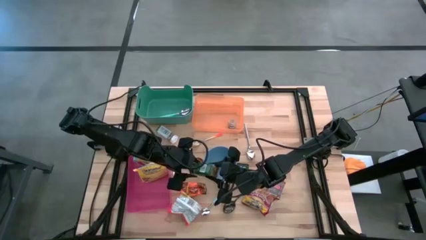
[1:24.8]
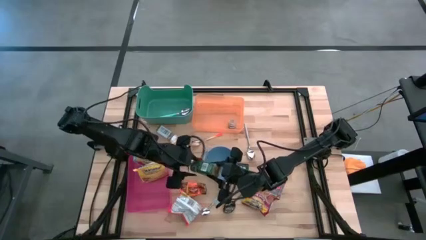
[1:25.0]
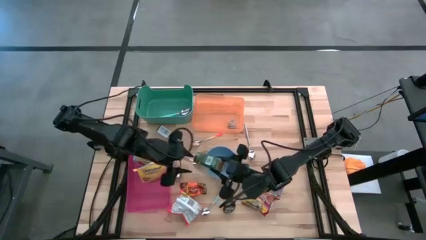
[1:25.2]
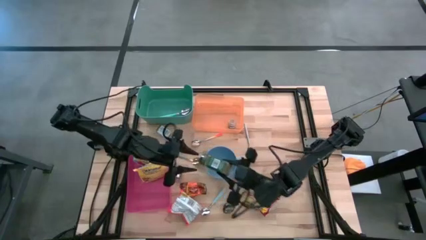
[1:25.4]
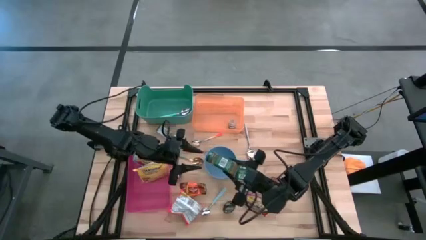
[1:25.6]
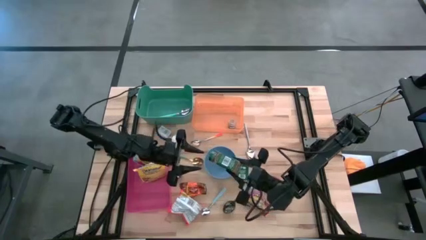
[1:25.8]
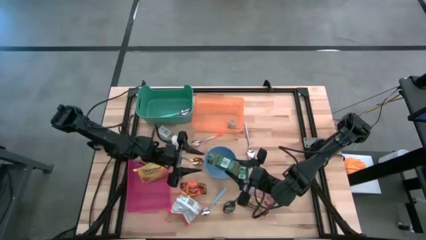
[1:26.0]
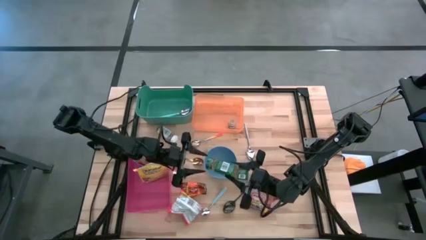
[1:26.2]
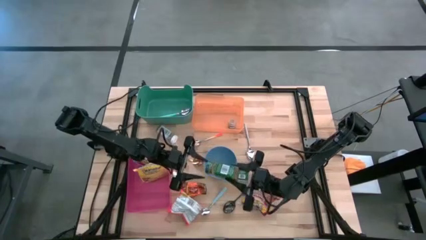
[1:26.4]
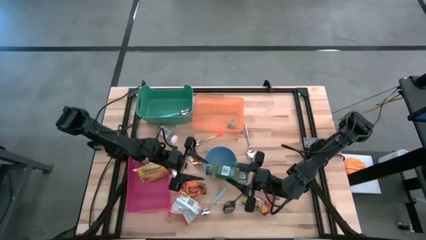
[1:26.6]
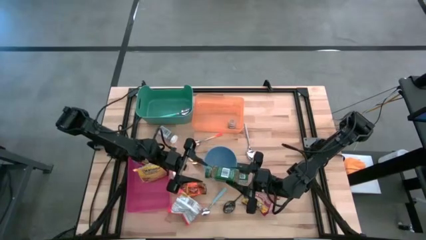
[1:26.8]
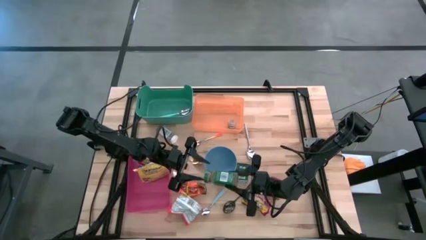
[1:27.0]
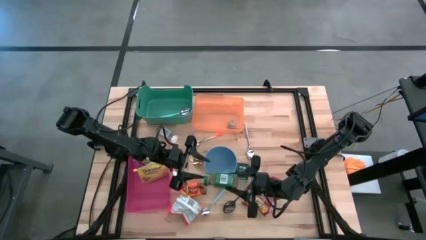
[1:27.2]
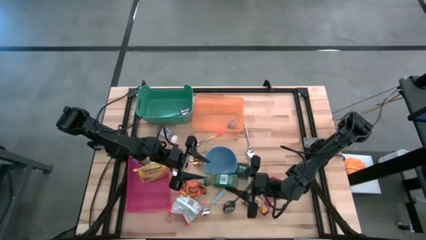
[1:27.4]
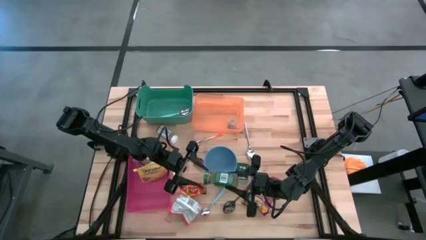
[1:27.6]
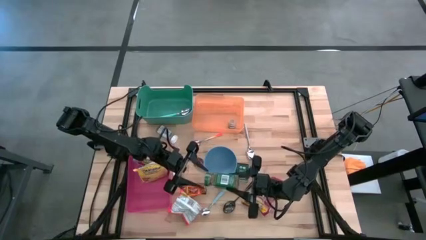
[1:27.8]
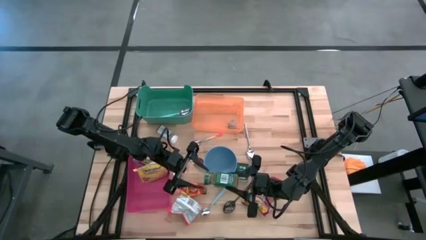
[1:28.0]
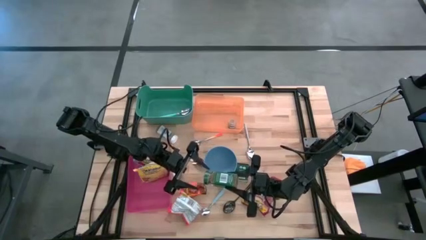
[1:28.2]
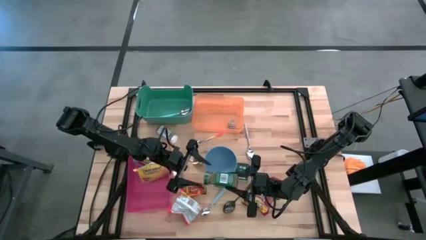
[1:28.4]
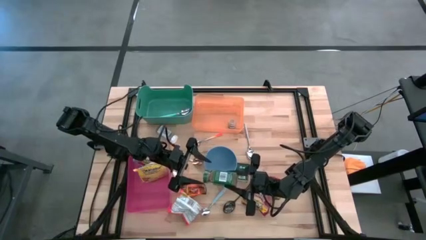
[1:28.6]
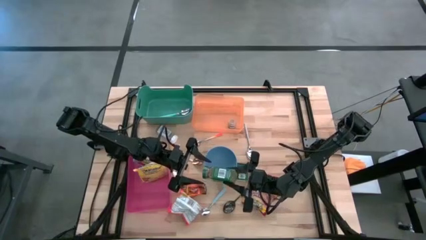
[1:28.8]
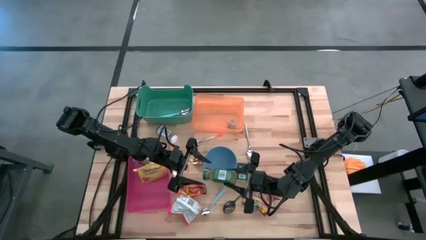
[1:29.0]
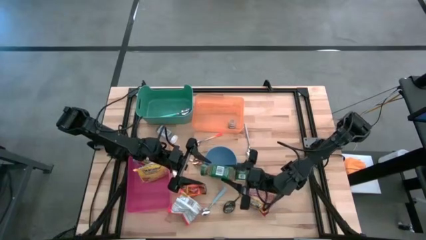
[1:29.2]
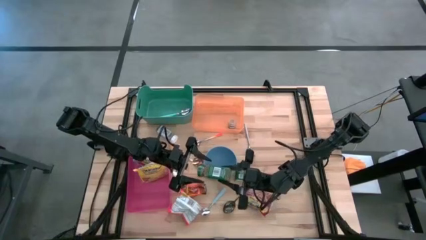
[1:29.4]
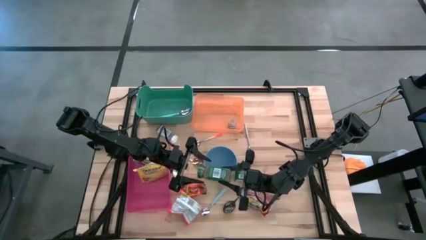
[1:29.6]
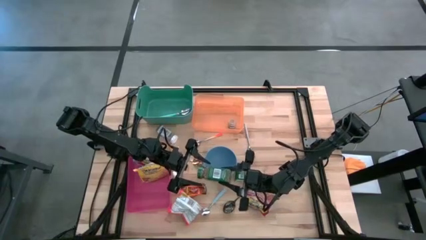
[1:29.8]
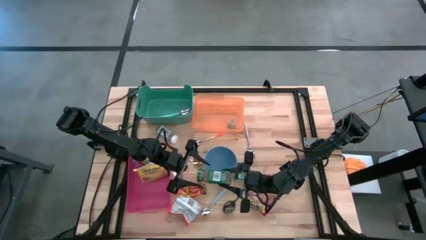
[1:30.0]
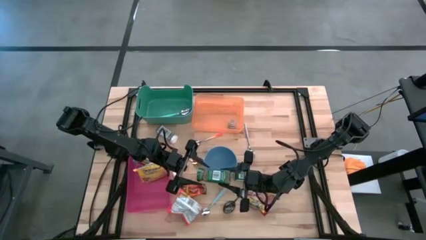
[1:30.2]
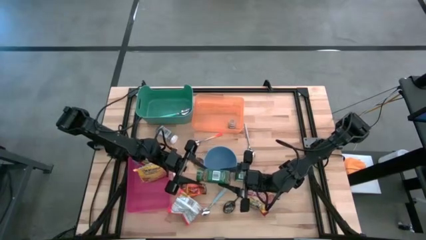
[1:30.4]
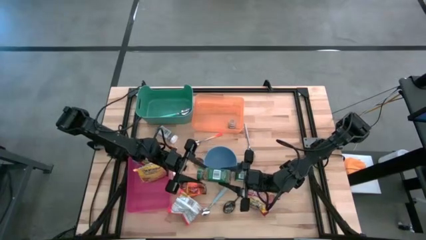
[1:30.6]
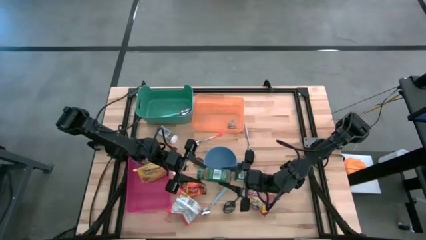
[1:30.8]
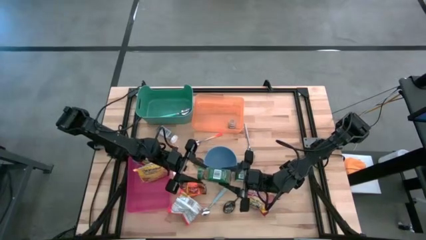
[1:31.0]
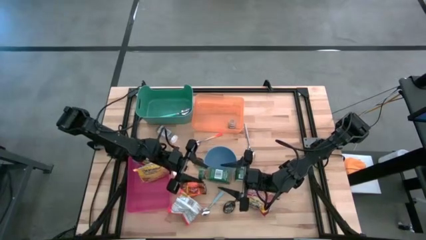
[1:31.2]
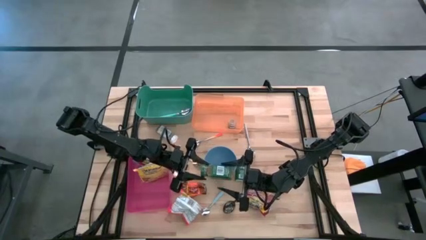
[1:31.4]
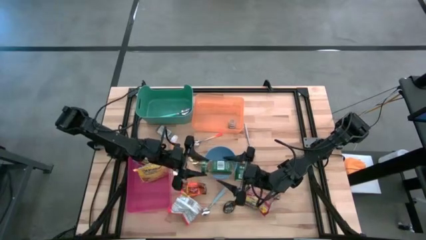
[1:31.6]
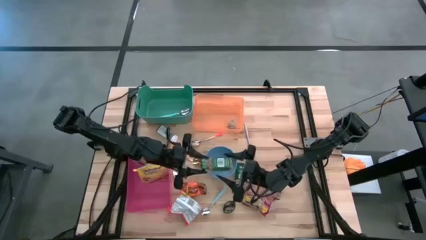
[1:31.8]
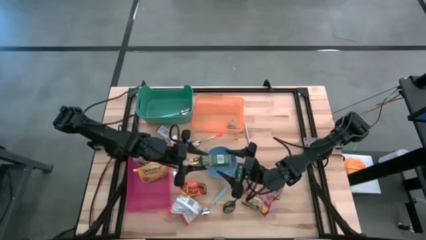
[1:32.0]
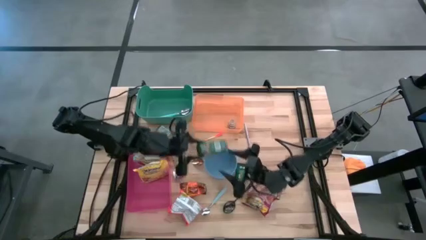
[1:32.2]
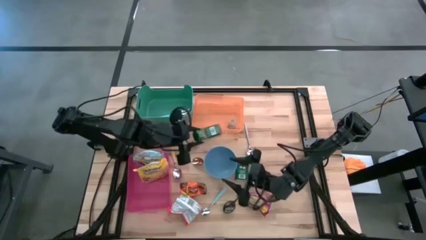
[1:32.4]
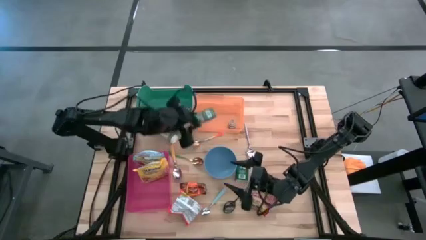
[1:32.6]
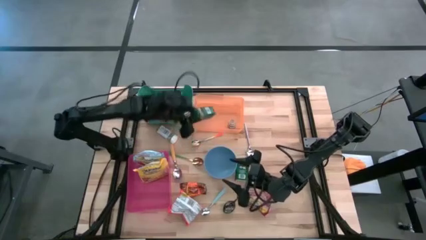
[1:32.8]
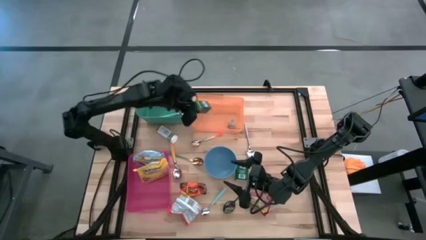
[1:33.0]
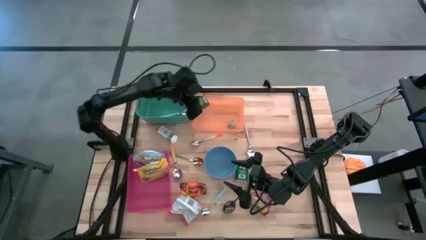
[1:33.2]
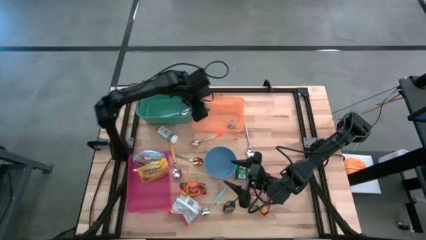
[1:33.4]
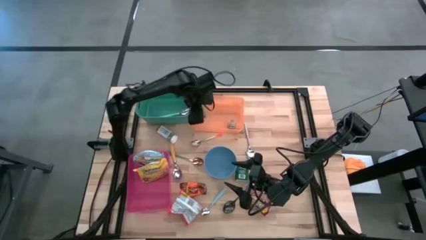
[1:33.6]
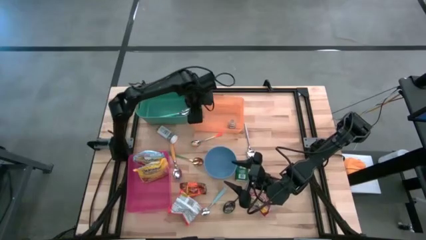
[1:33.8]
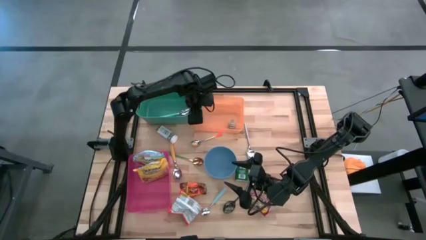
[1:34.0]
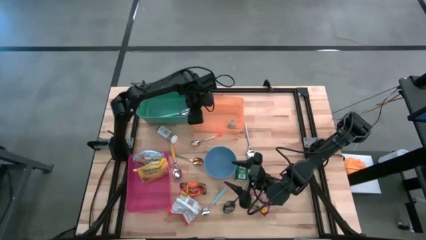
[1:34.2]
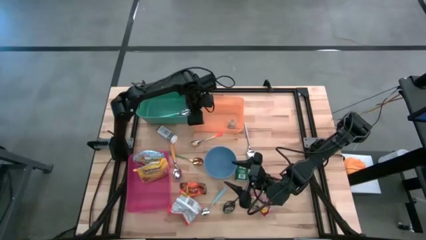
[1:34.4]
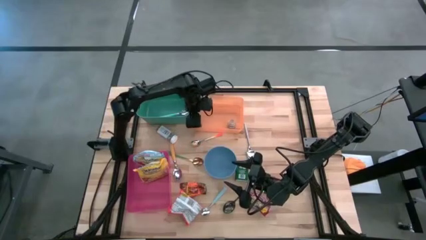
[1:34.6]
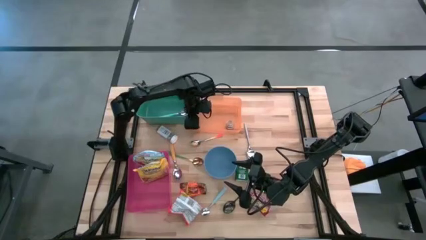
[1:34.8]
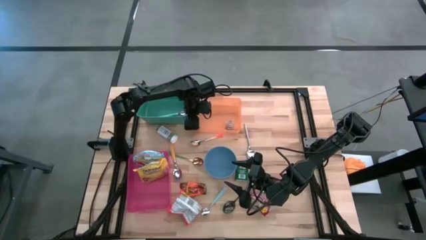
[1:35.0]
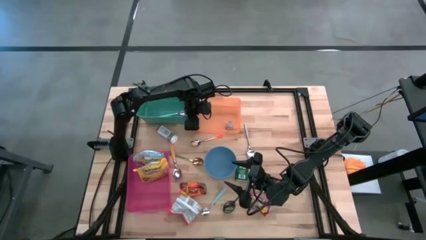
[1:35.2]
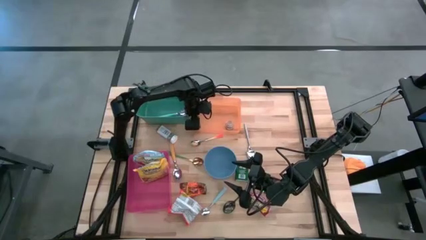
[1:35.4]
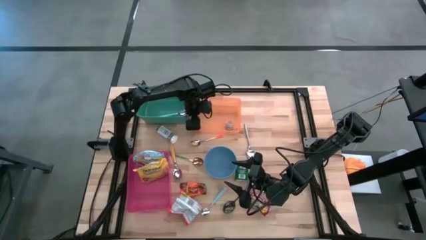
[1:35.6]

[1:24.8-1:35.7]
Put the green spice bottle into the orange bin
